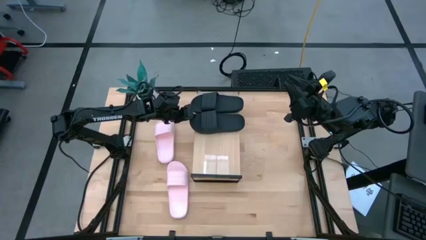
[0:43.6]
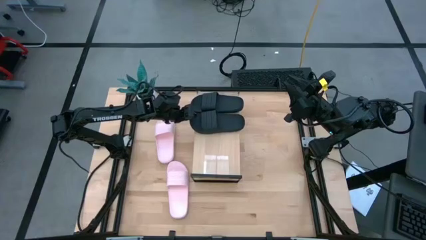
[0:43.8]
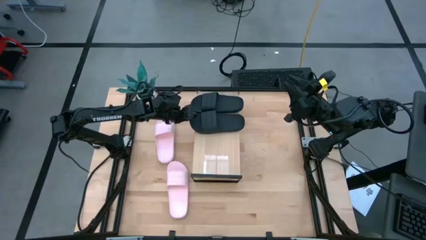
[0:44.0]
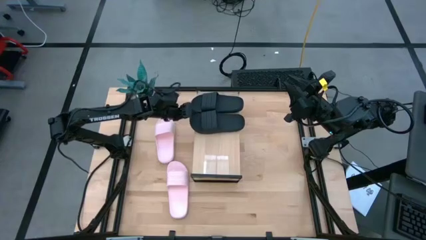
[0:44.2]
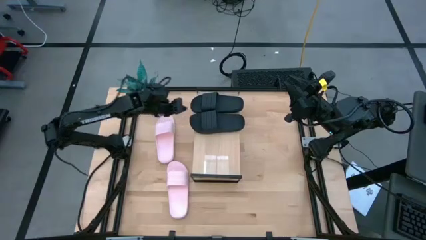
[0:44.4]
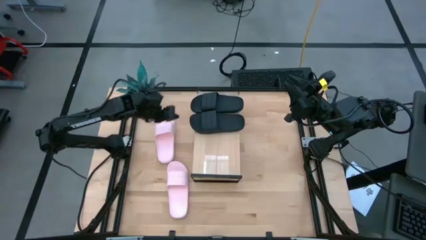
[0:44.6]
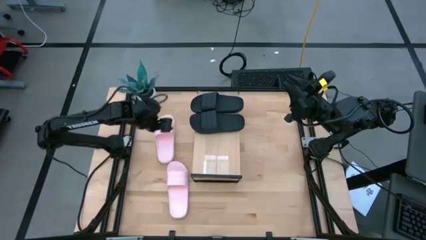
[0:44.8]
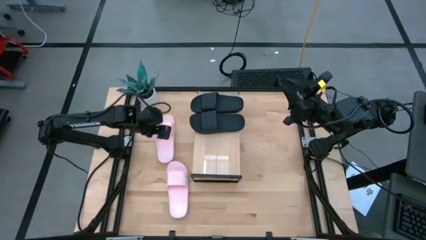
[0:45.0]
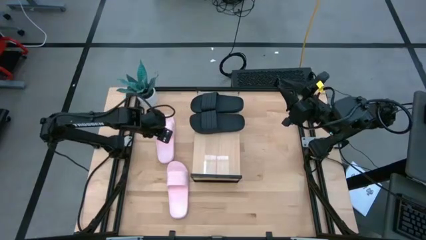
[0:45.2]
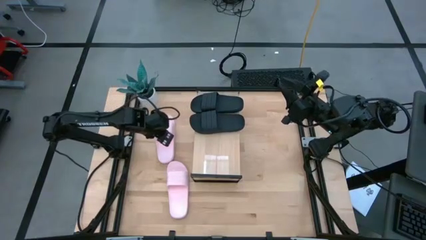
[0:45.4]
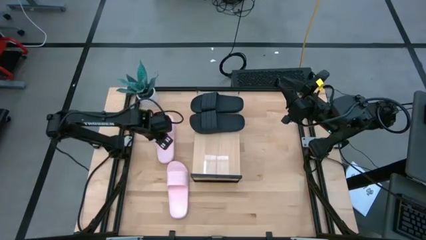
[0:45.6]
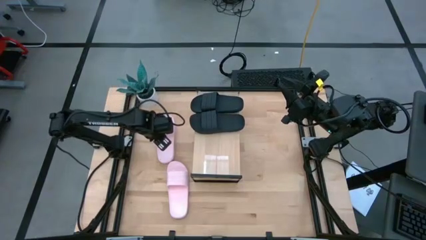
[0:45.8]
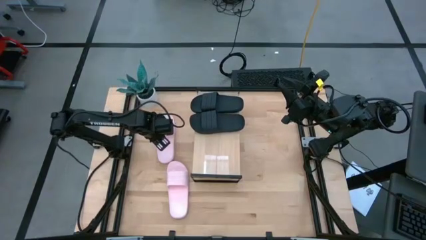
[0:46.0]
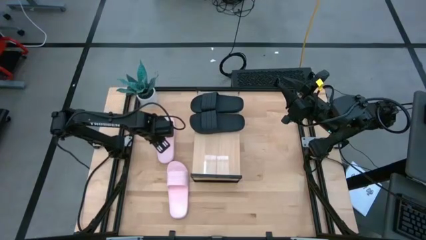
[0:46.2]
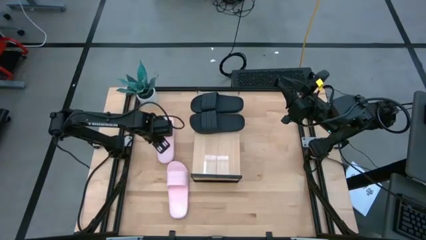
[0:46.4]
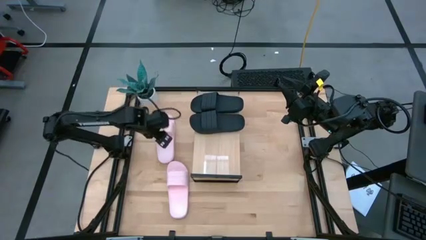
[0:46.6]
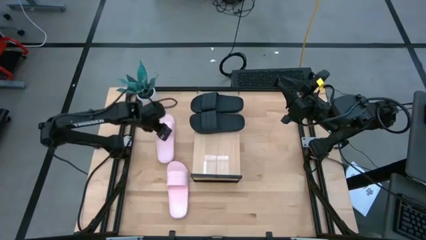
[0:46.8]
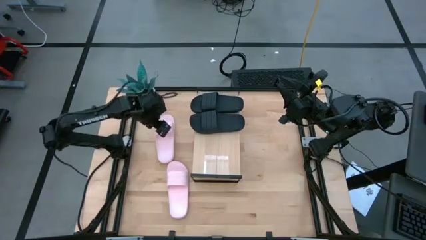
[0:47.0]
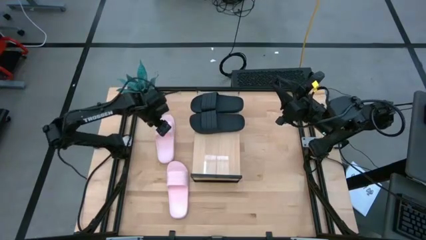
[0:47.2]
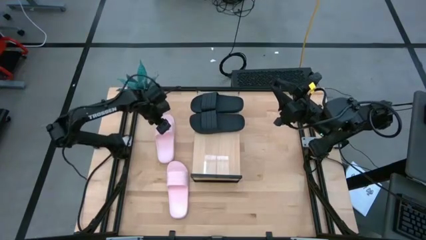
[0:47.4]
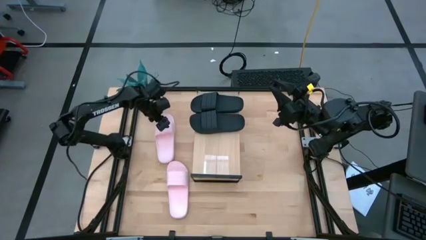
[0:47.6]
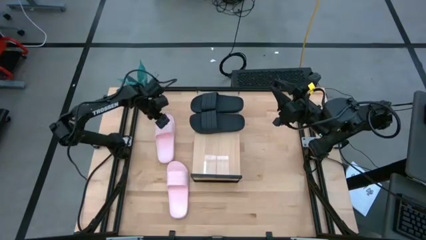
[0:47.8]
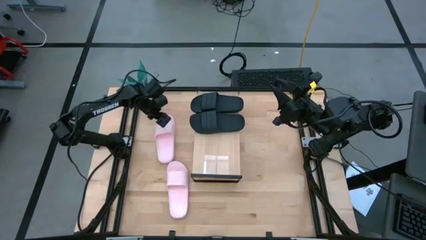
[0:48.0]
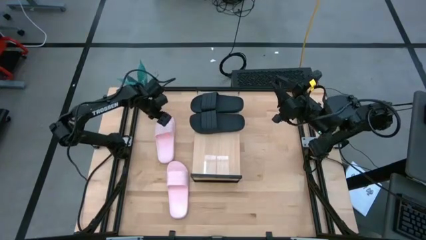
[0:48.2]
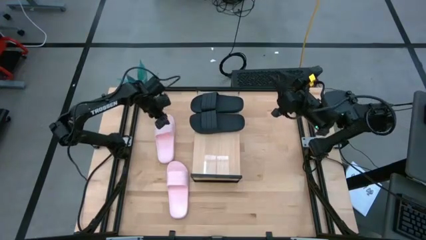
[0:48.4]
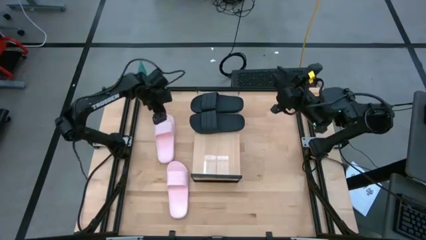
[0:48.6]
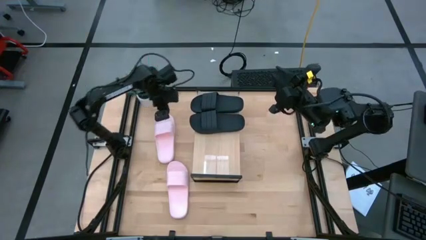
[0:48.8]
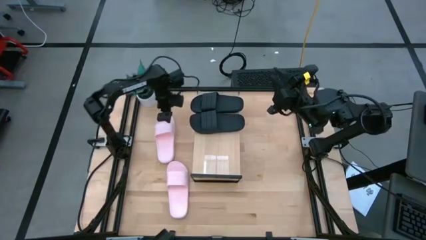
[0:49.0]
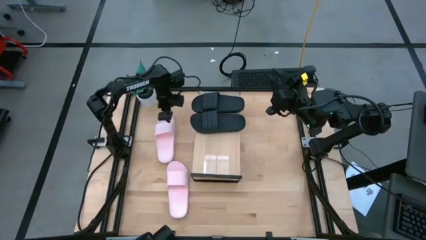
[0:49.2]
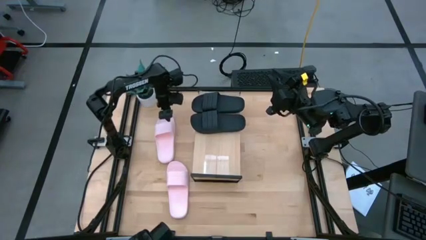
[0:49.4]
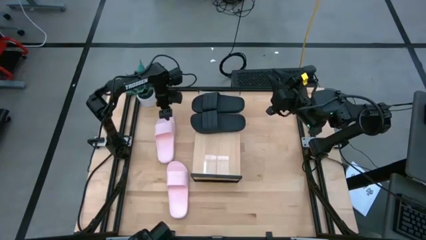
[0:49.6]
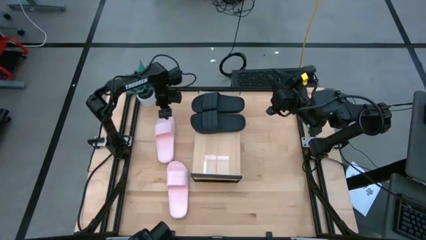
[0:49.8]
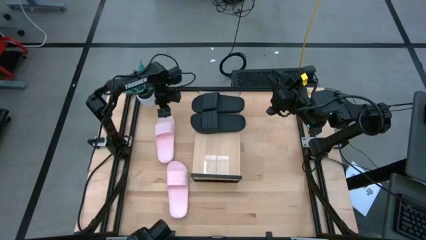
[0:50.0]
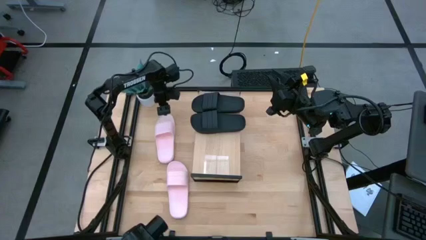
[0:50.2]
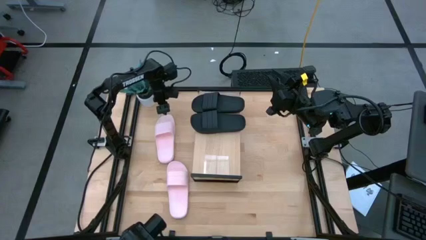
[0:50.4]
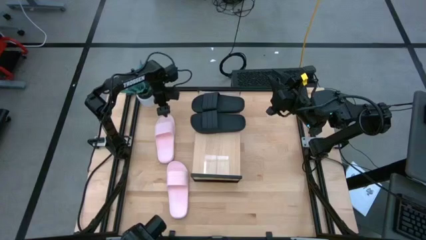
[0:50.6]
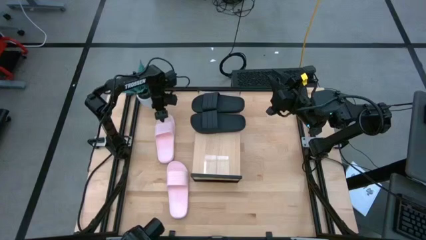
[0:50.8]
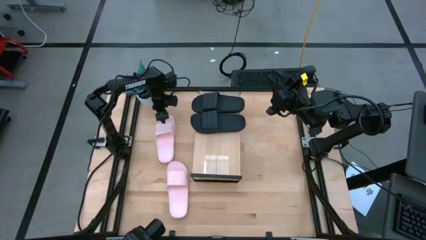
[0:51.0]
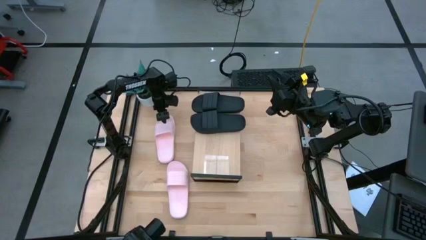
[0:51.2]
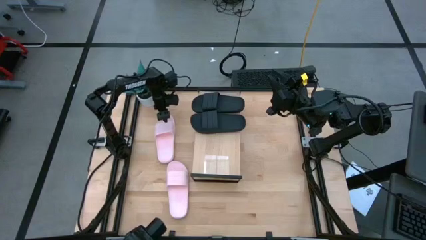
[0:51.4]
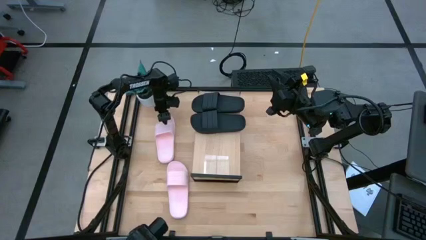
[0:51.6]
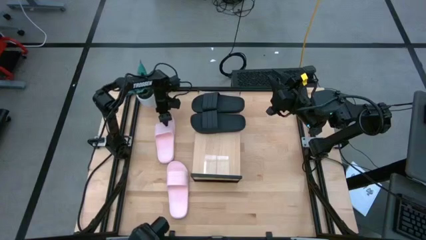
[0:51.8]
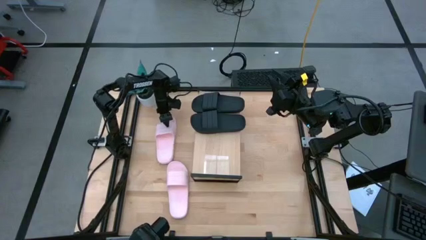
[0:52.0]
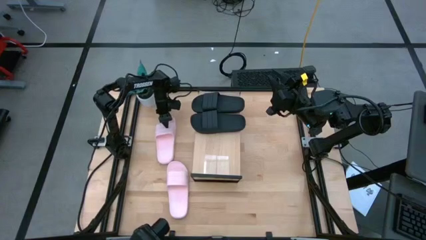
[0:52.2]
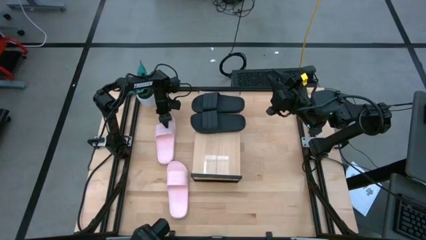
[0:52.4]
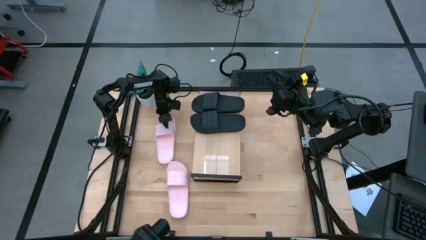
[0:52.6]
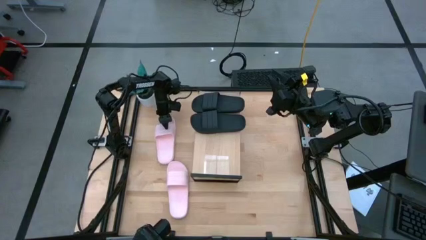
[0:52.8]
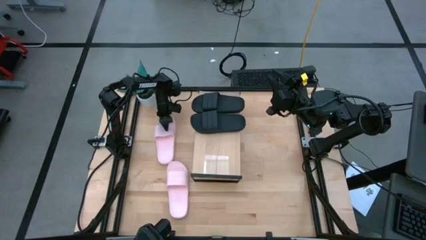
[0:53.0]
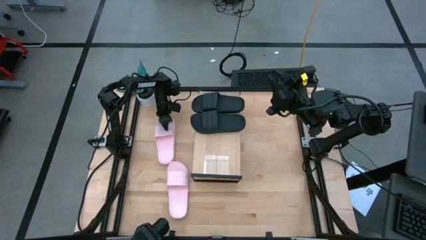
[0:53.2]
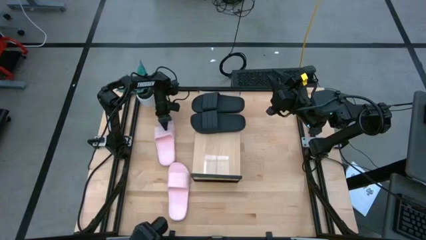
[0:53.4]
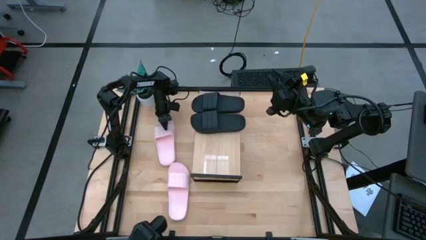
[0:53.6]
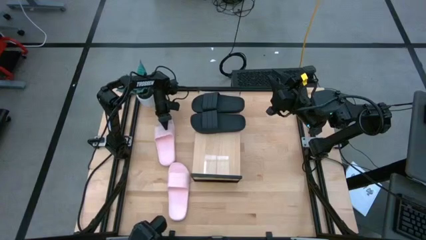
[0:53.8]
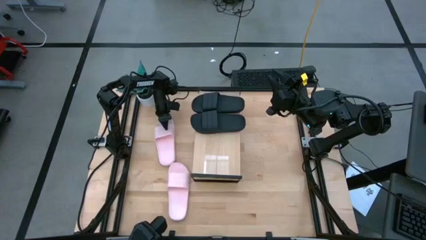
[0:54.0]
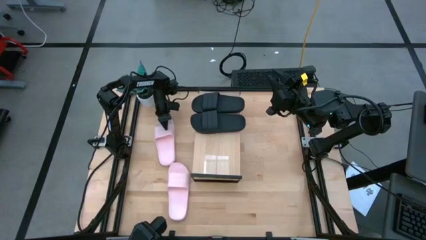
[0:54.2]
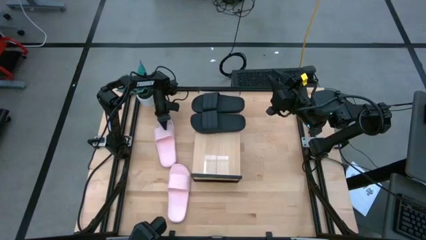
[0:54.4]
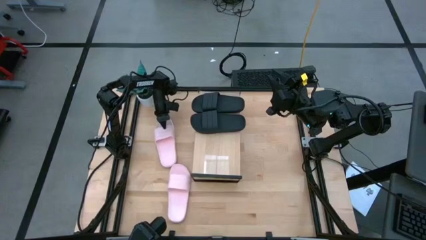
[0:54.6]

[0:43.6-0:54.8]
Task: Pick and place slides into the shelf
Put the top white slides on the shelf

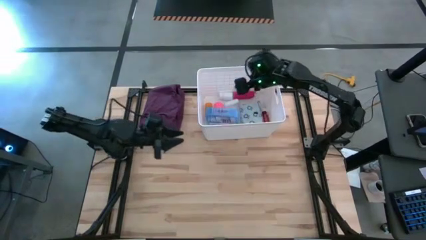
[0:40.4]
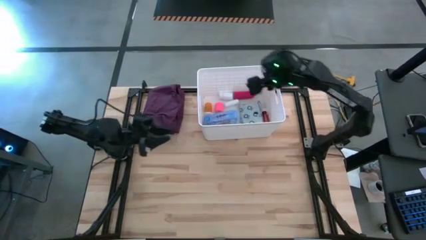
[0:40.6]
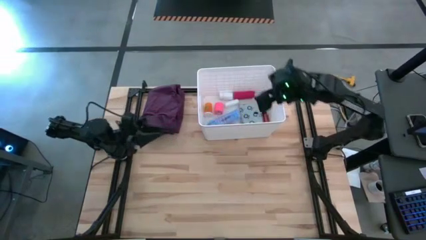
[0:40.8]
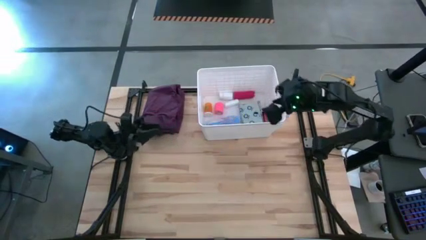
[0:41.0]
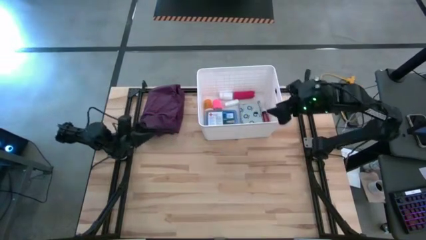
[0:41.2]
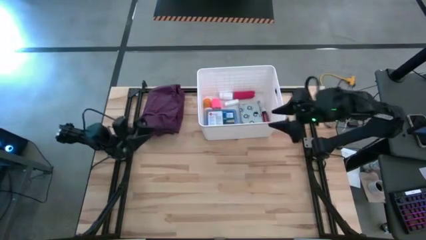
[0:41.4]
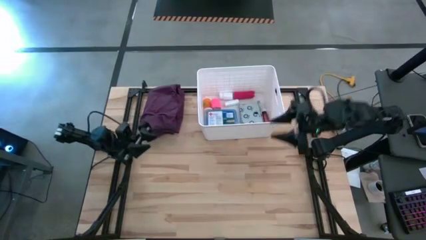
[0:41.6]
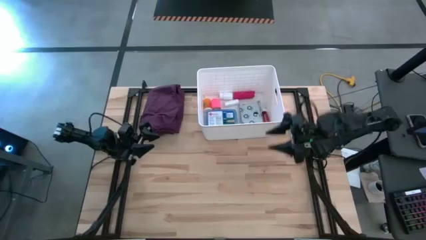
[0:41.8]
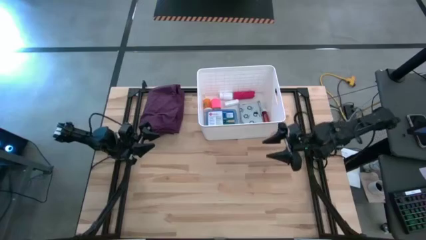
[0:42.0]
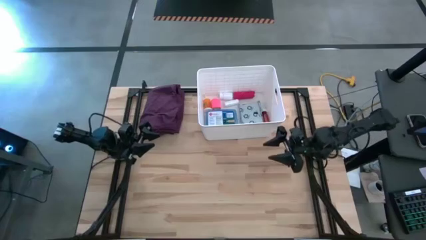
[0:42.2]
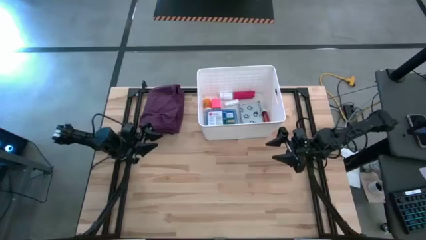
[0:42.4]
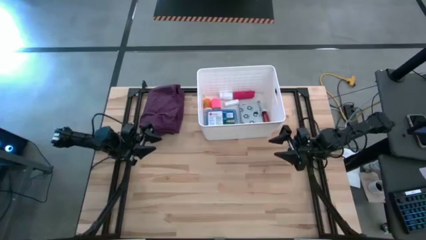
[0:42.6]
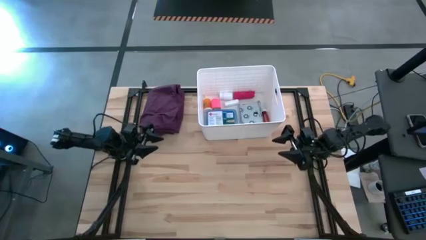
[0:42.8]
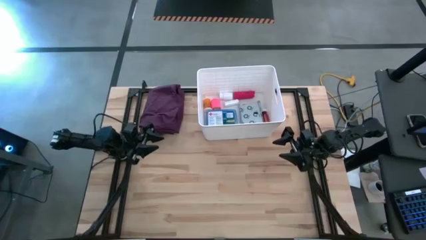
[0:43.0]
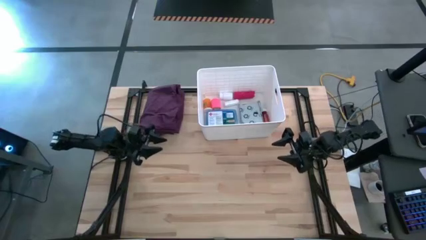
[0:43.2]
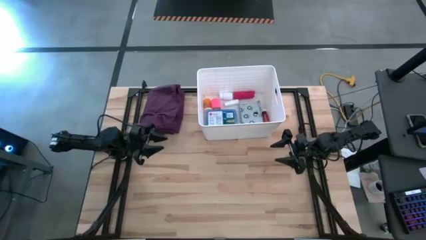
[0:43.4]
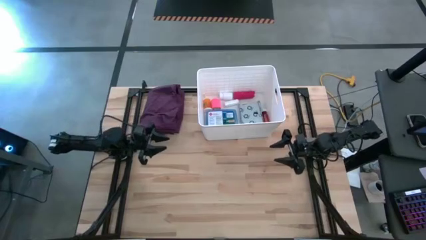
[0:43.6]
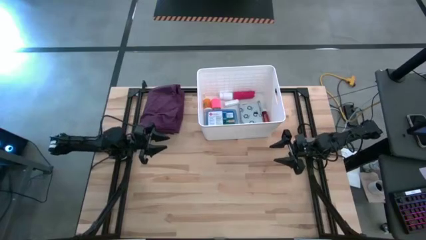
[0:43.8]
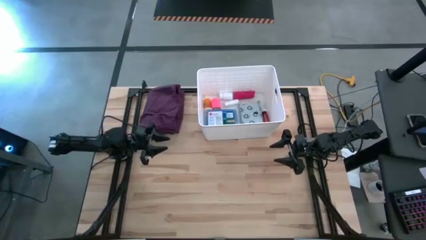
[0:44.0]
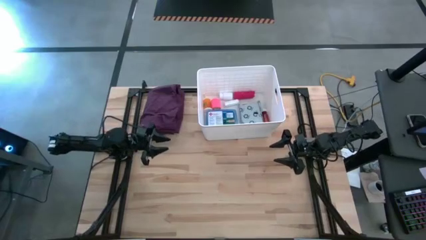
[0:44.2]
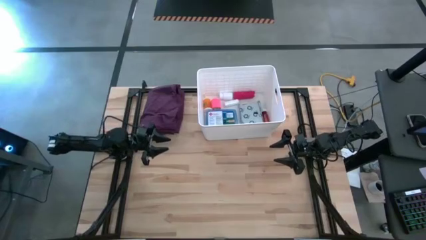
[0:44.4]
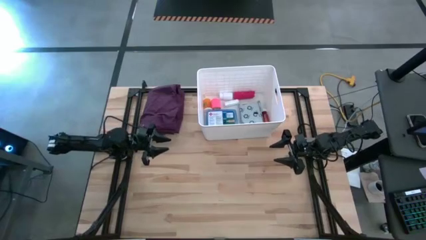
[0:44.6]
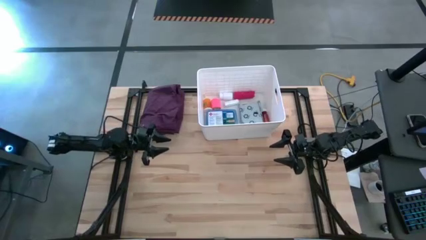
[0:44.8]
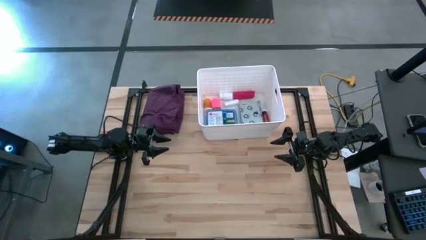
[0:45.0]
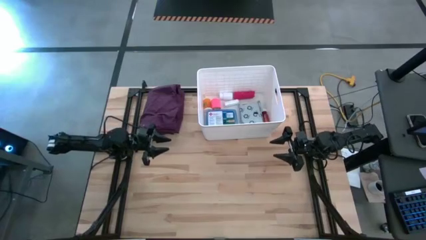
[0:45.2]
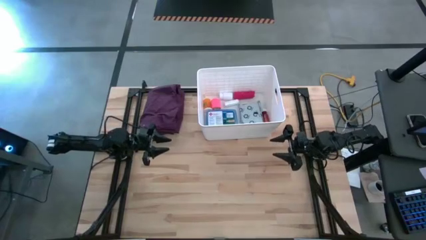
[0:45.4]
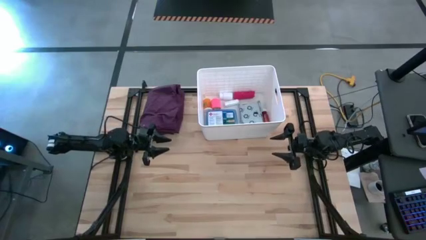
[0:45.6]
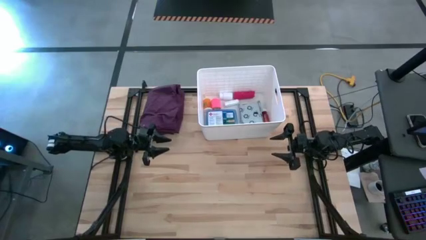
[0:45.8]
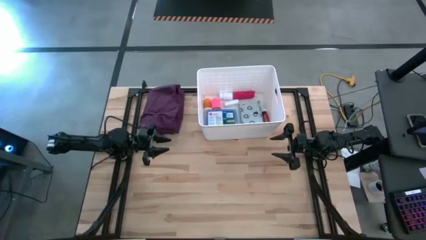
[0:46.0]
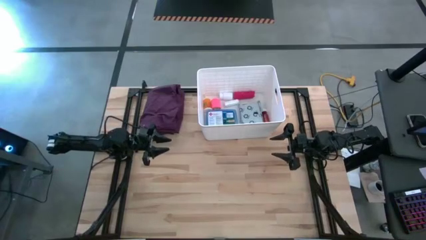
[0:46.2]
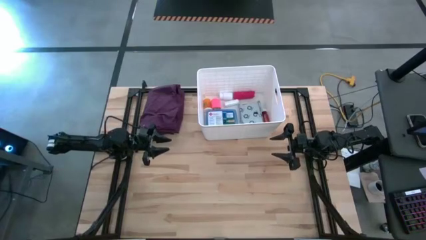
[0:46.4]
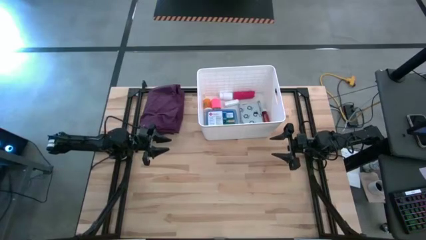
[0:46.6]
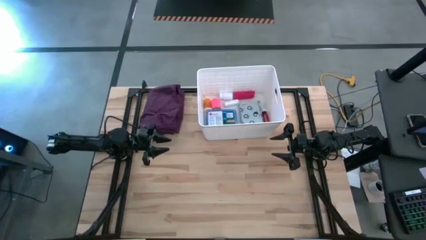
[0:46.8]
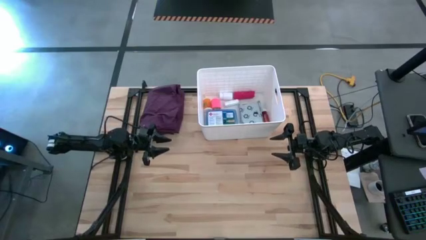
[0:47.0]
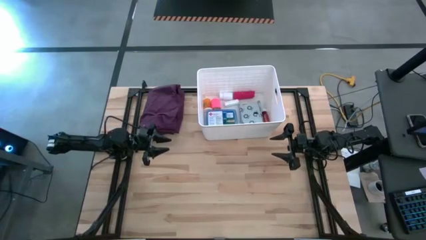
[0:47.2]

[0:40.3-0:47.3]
Task: Pick & place medical supplies in basket/bin
Return to Home Position
